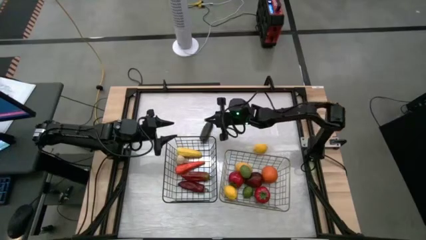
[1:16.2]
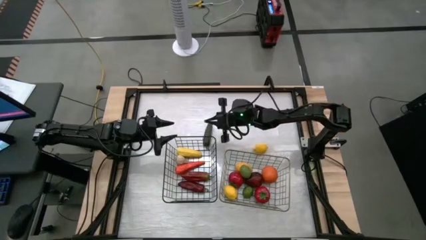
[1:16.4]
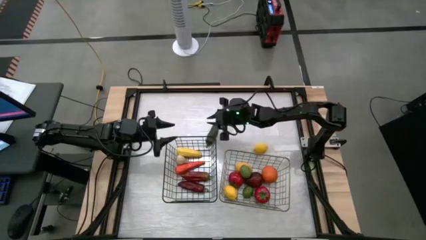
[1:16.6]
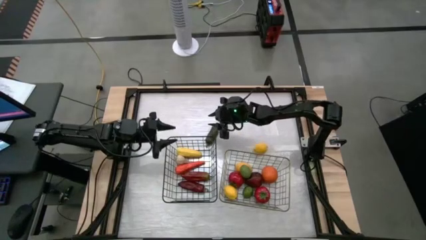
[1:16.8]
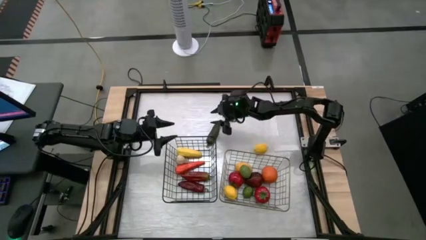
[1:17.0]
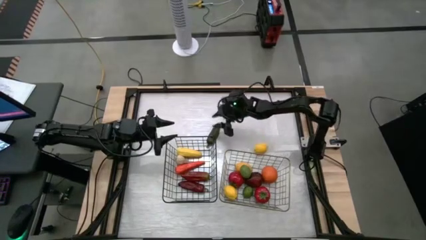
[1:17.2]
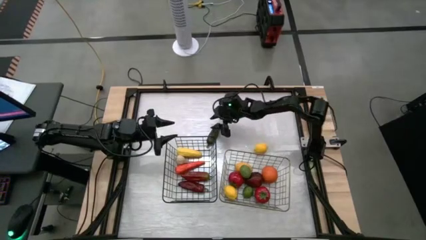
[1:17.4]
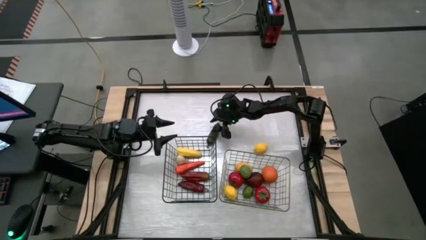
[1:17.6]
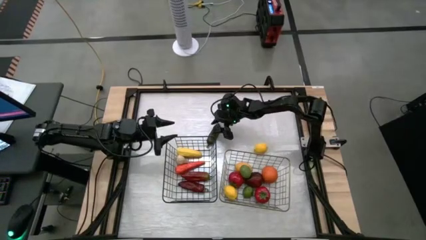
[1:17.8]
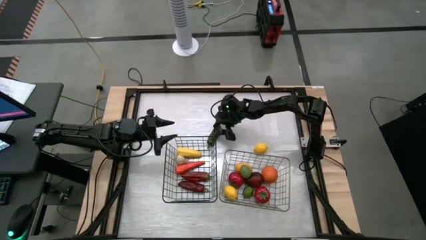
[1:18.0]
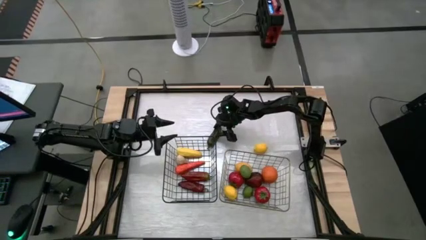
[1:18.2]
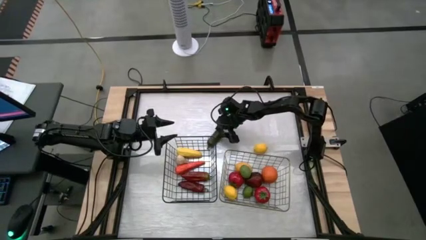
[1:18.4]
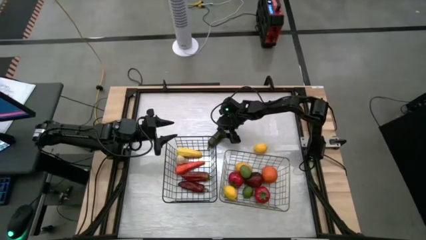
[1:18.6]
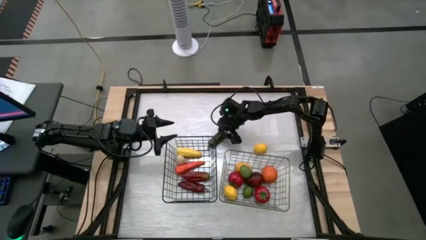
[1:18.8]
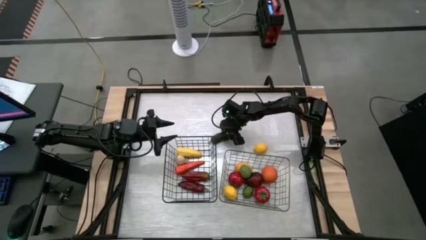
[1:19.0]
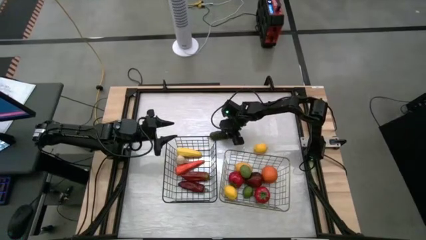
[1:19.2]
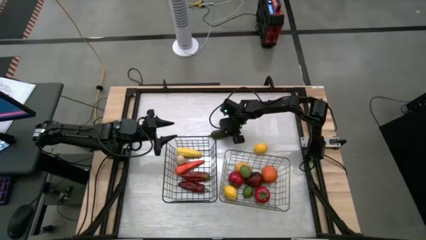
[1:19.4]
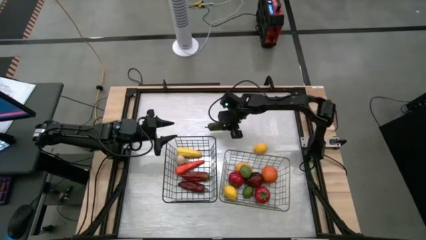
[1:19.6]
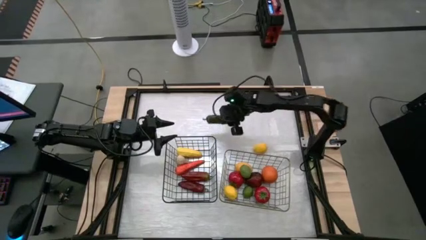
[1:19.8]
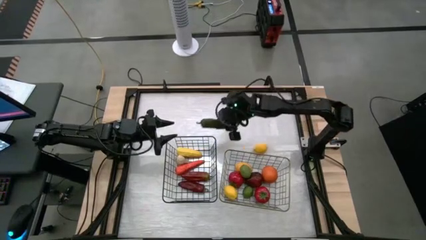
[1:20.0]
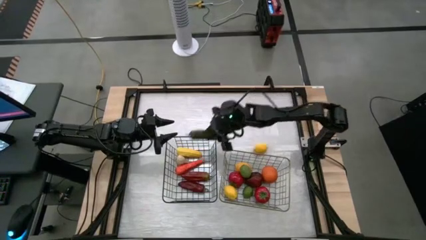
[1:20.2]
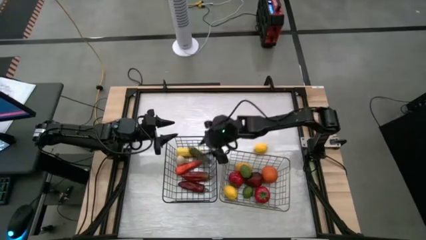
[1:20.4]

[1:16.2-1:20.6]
Task: Sort produce into baskets
Put the green pepper into the left wire basket

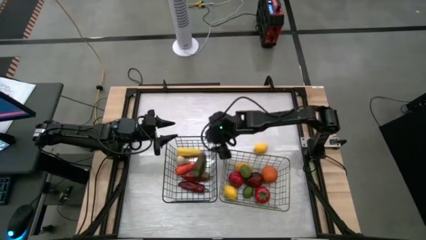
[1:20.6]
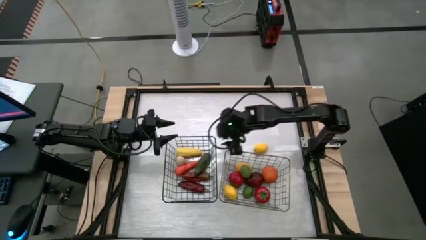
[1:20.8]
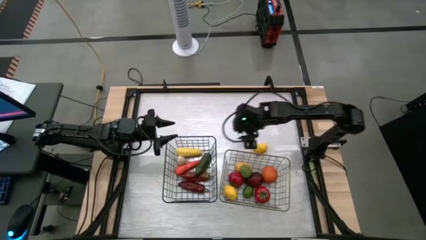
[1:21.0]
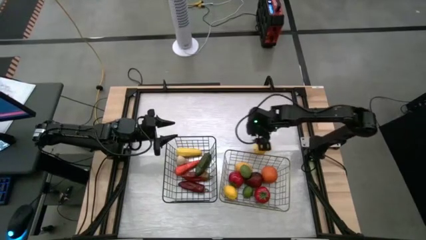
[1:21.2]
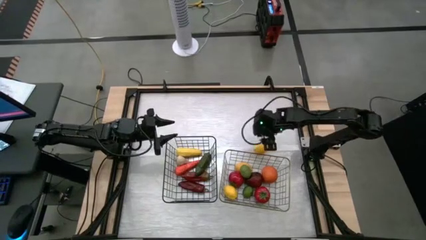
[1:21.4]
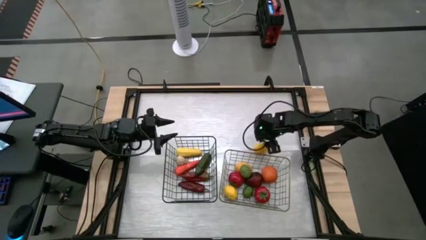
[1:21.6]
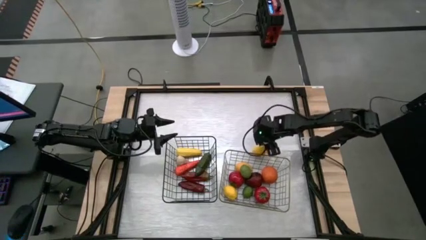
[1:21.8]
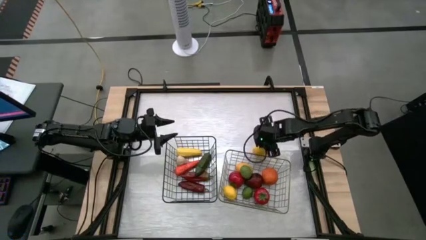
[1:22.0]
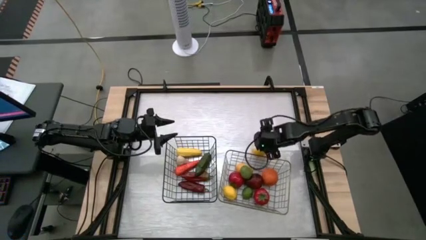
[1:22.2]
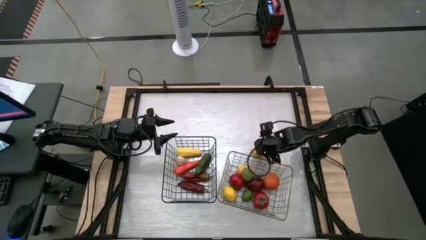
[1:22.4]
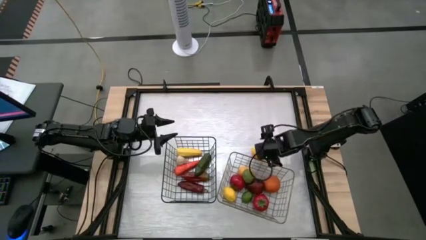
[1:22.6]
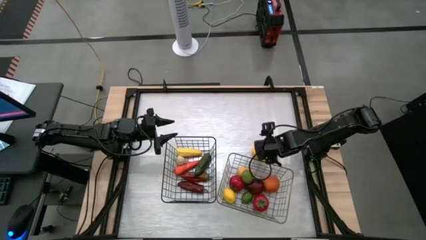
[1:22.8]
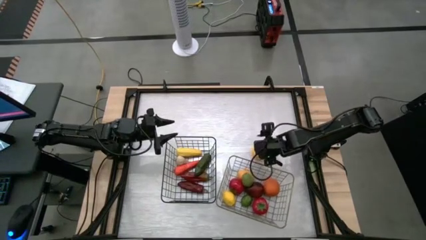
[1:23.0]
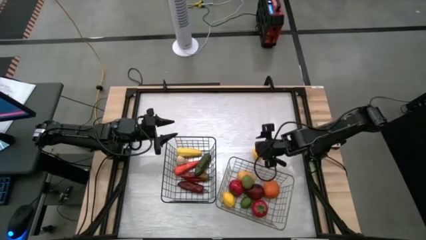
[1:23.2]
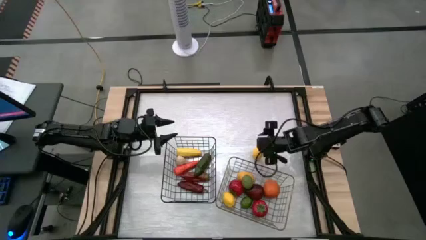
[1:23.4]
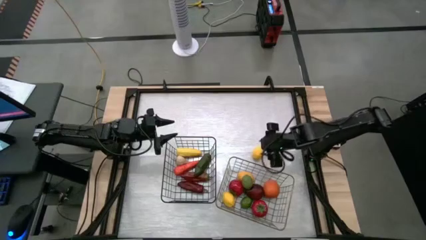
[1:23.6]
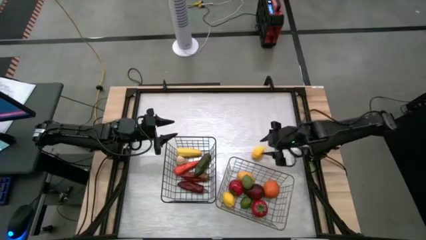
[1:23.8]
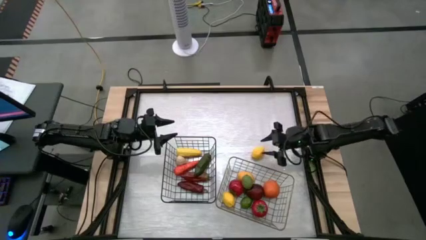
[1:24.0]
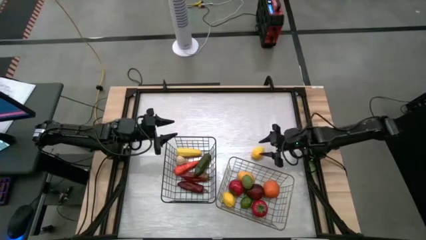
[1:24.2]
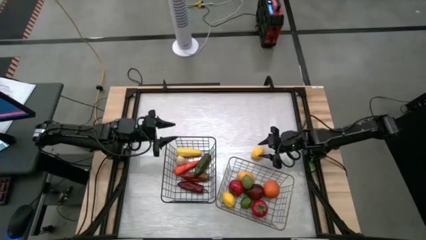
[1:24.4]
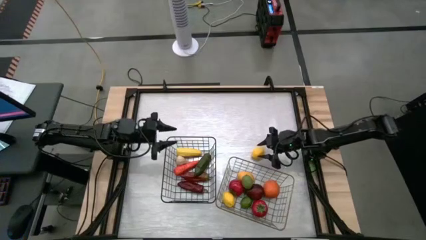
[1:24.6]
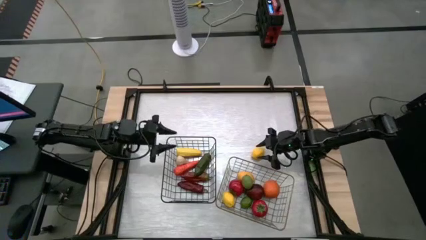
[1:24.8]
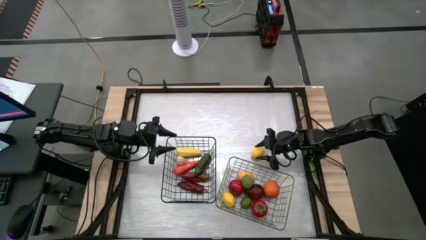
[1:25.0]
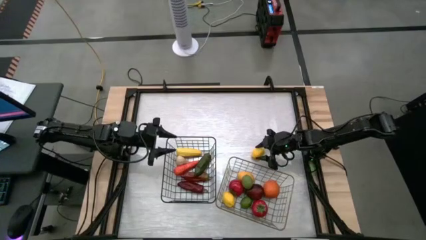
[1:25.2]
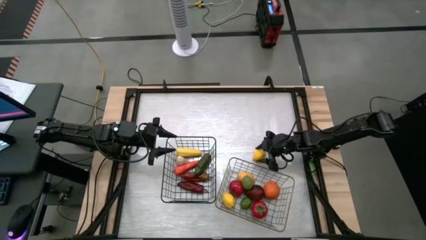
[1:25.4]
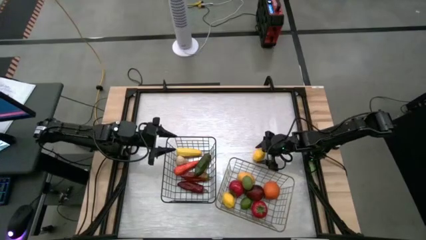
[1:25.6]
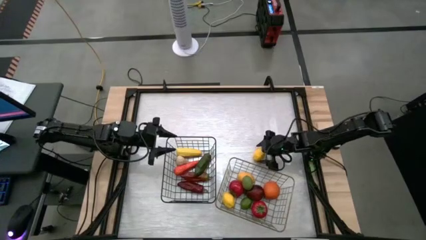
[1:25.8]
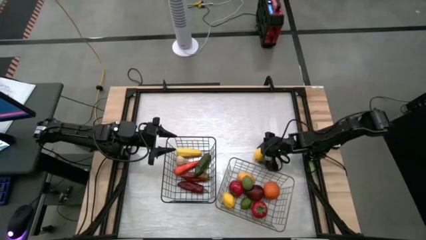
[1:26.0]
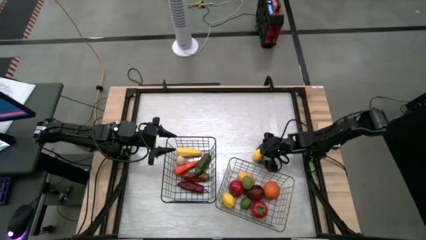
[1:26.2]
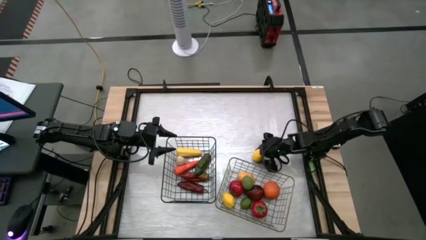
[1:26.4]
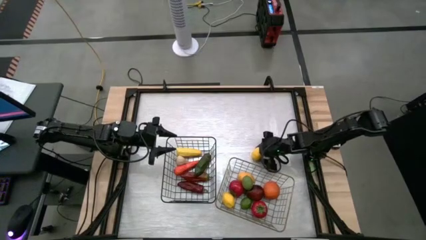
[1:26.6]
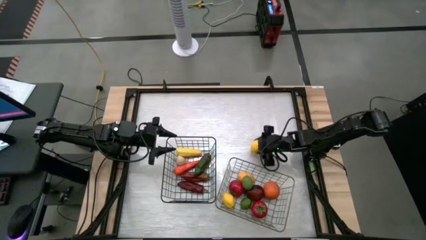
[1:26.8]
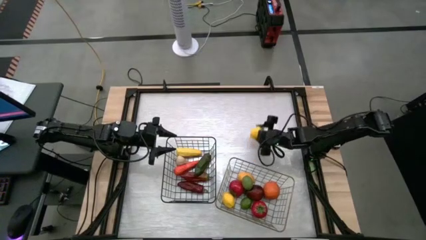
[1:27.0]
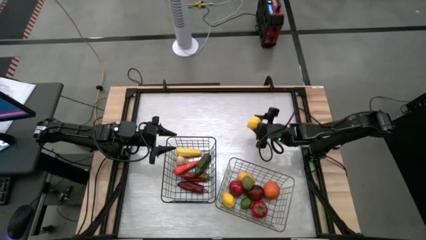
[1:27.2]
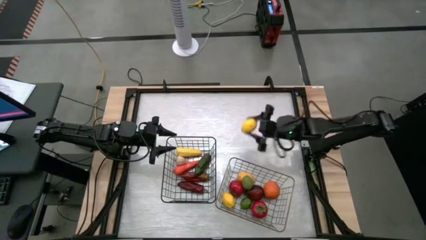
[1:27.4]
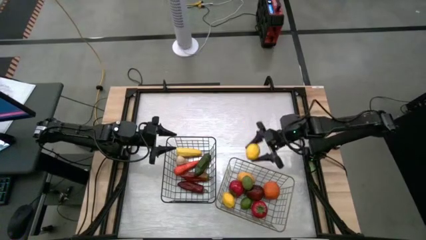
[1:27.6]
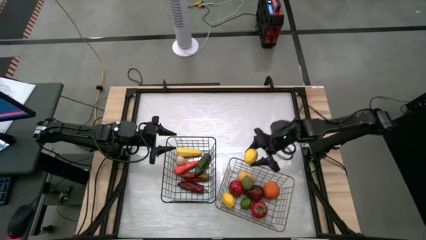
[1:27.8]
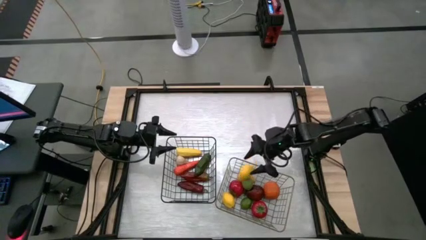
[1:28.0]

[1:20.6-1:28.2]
Put the lemon into the right wire basket

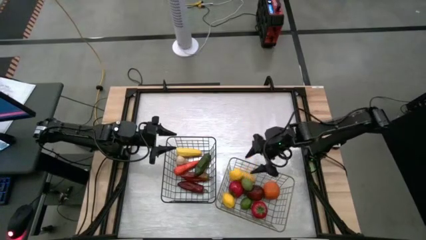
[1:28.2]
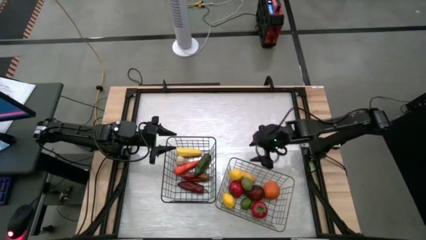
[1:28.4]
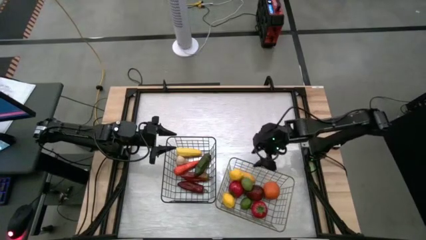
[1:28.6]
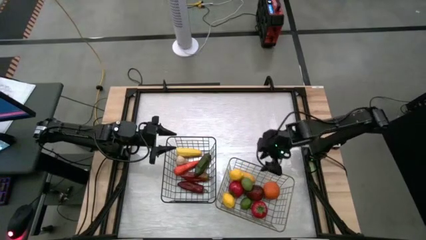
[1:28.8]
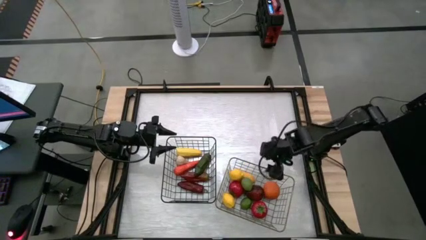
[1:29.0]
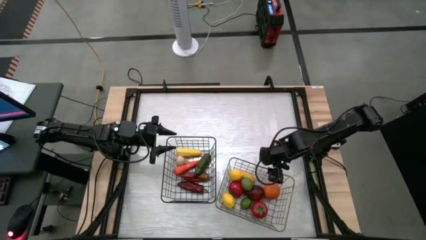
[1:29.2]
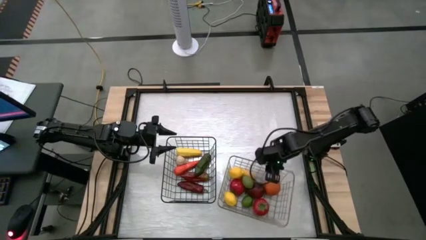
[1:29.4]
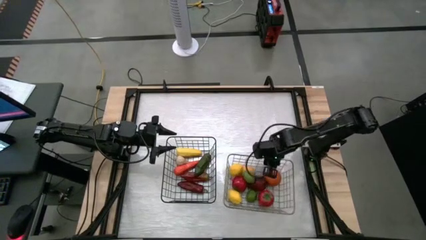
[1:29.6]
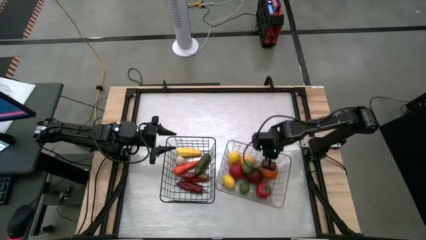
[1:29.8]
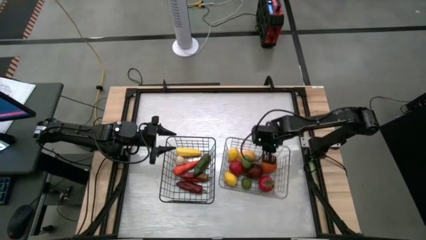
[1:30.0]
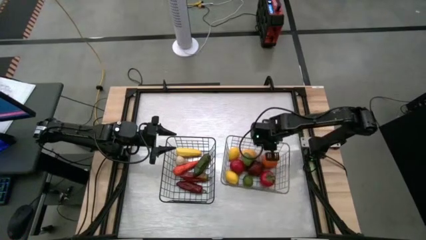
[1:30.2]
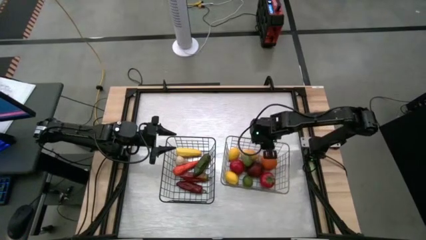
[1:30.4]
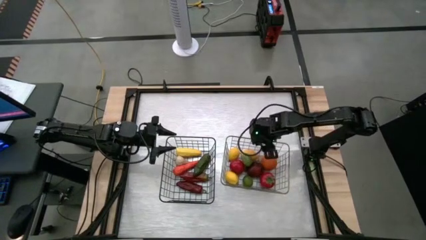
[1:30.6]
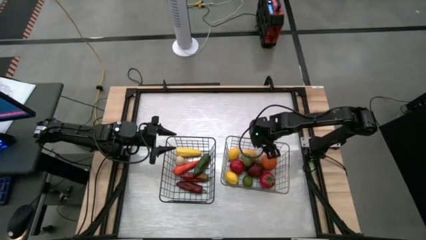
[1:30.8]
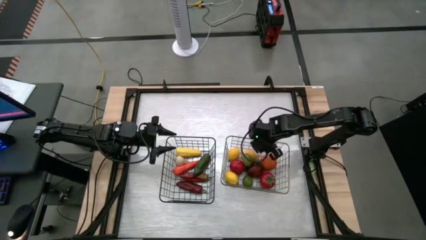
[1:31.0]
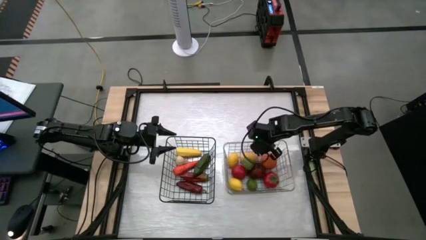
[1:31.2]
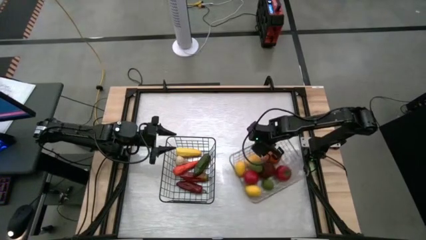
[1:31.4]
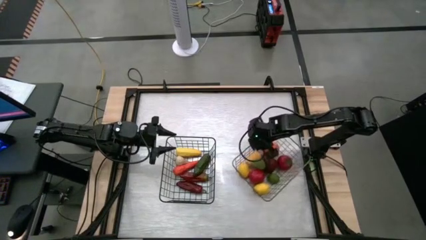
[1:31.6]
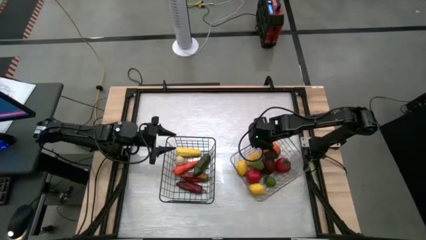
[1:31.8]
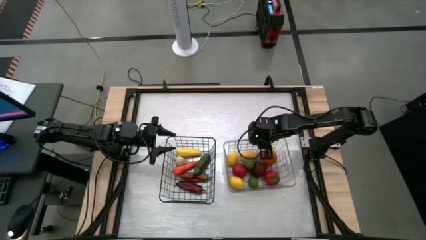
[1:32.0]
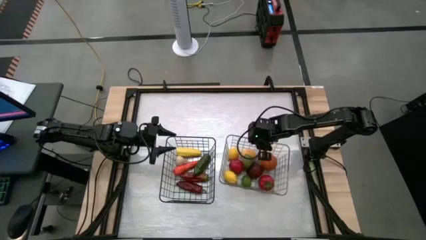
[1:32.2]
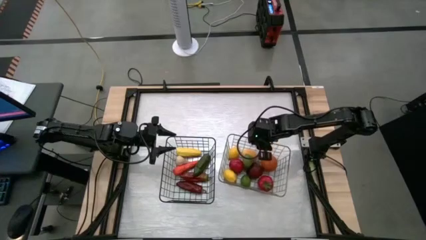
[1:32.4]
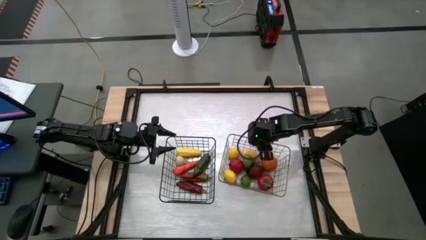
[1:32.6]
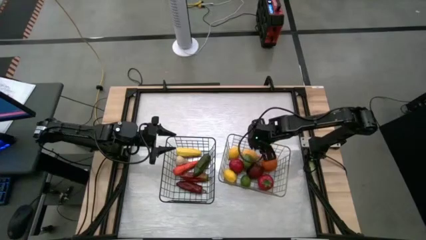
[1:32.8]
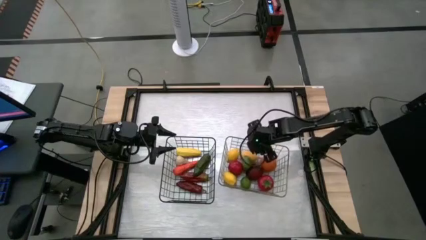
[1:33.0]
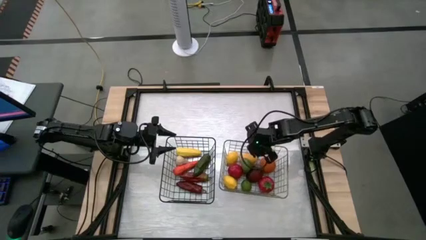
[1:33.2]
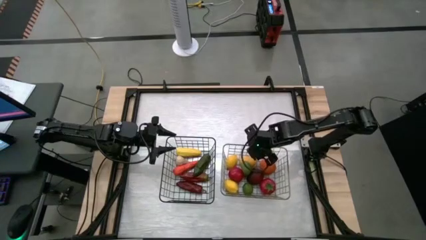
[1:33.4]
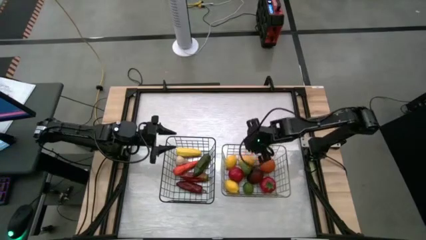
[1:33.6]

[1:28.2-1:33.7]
Adjust the right wire basket
